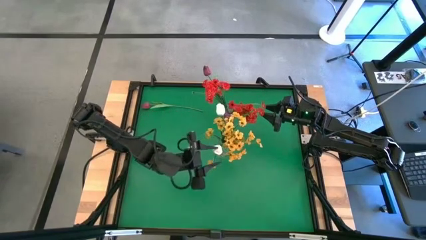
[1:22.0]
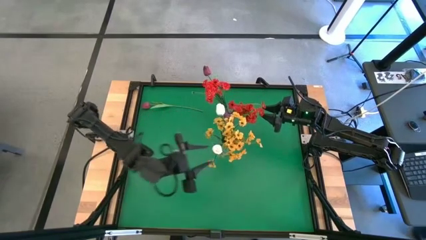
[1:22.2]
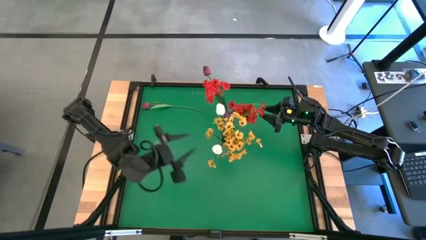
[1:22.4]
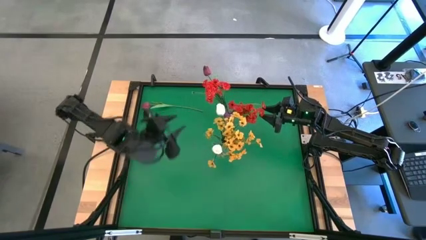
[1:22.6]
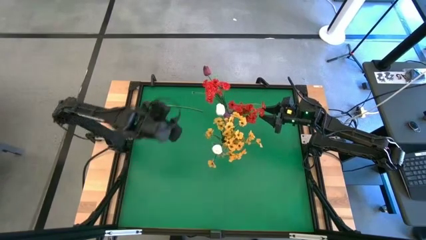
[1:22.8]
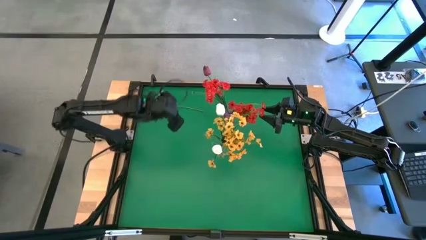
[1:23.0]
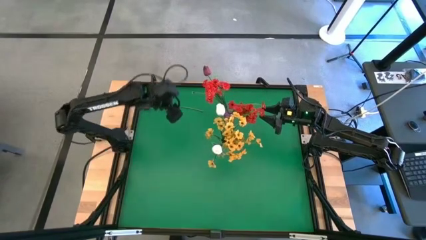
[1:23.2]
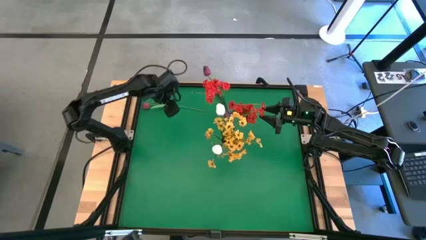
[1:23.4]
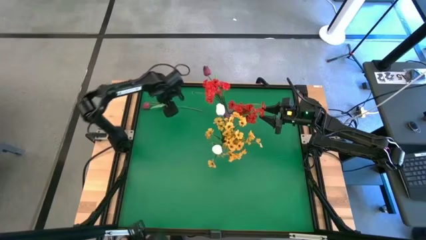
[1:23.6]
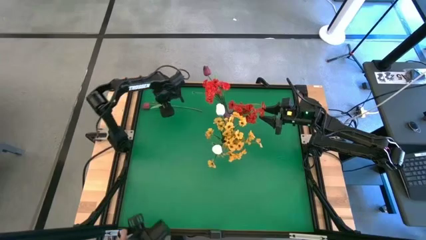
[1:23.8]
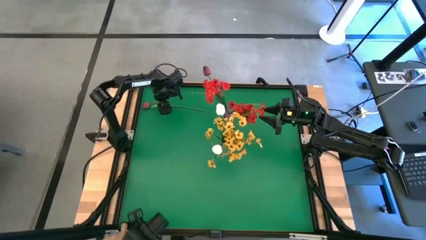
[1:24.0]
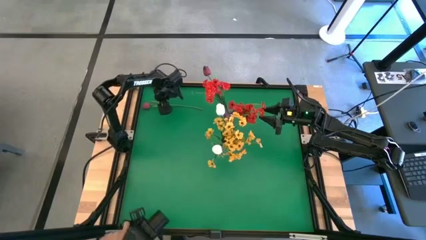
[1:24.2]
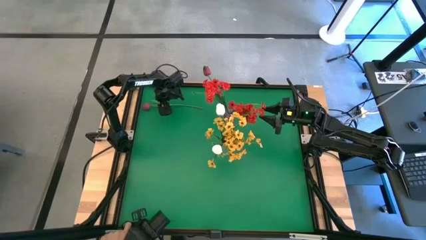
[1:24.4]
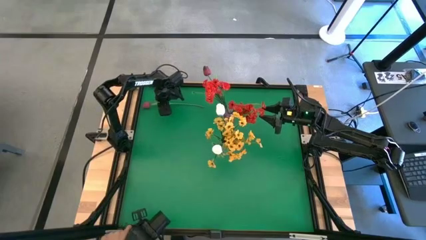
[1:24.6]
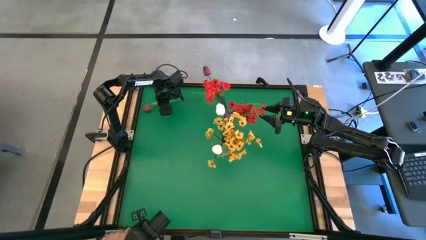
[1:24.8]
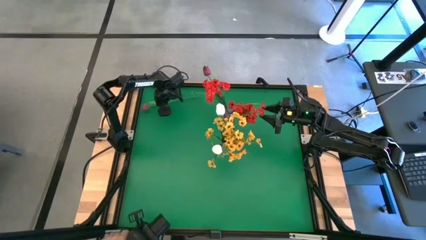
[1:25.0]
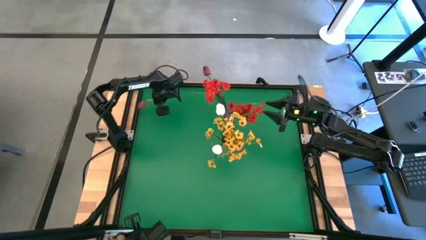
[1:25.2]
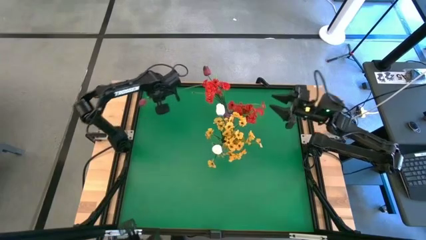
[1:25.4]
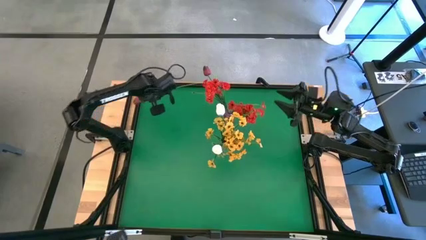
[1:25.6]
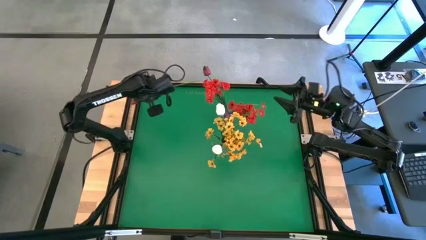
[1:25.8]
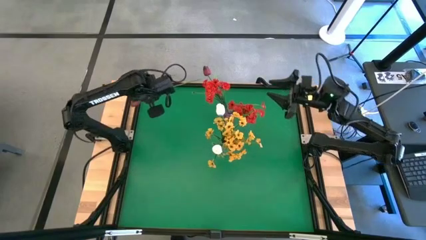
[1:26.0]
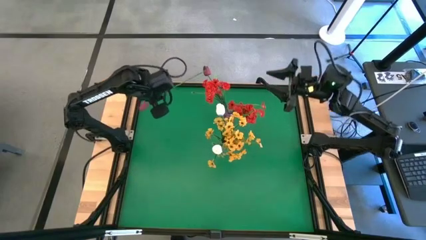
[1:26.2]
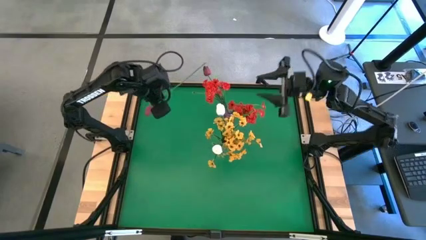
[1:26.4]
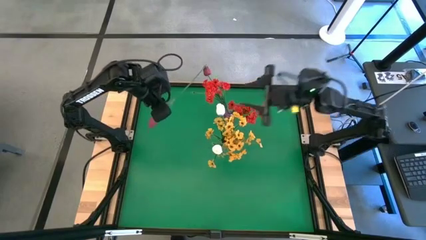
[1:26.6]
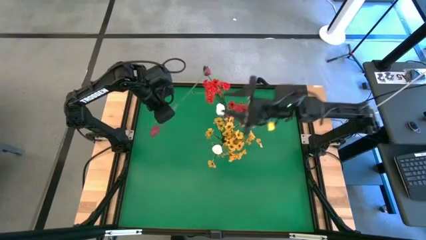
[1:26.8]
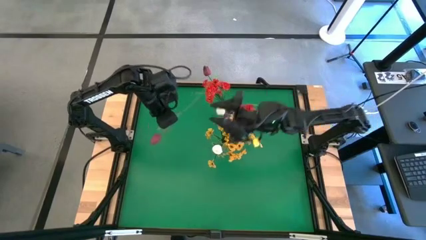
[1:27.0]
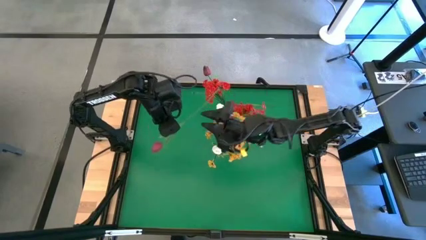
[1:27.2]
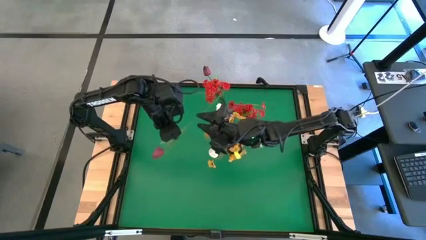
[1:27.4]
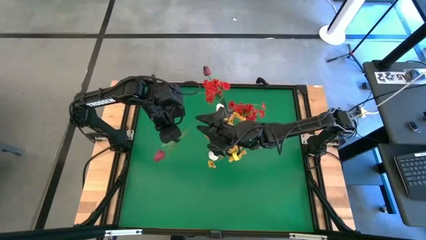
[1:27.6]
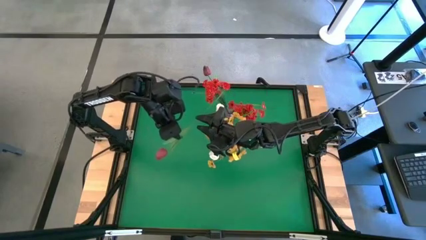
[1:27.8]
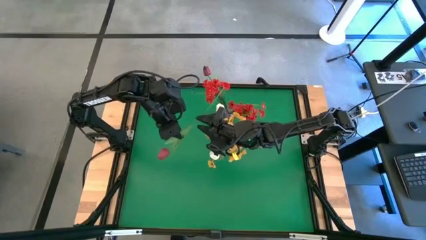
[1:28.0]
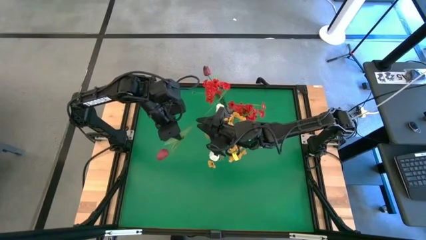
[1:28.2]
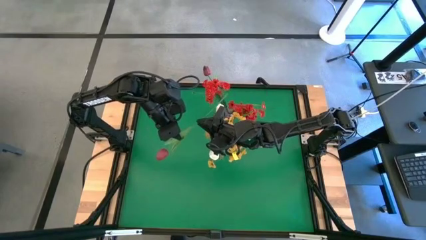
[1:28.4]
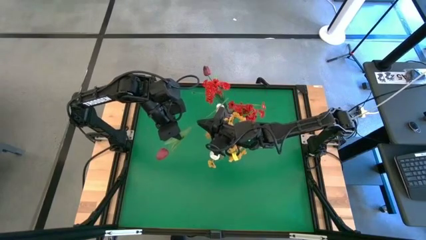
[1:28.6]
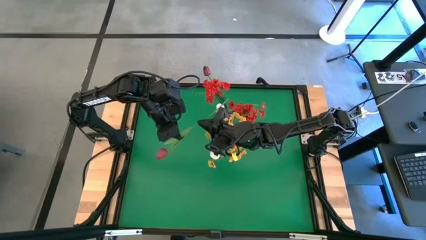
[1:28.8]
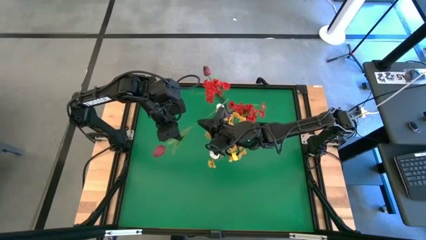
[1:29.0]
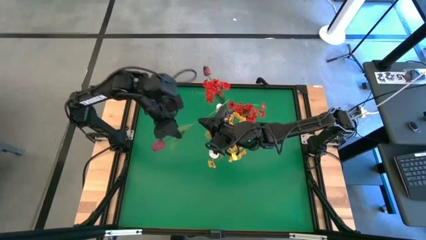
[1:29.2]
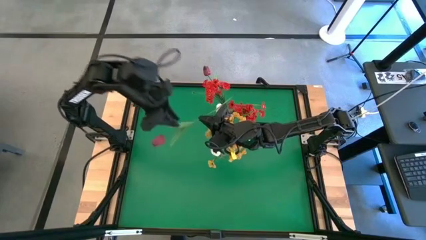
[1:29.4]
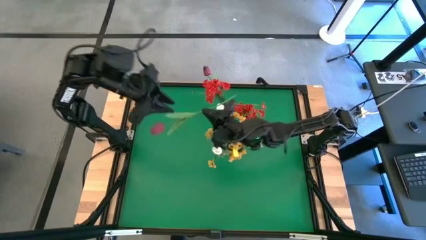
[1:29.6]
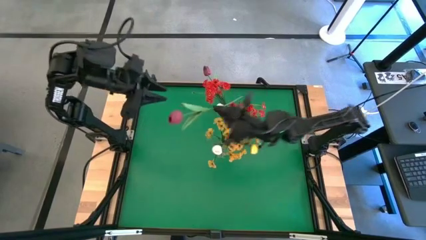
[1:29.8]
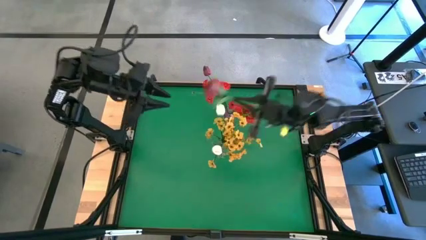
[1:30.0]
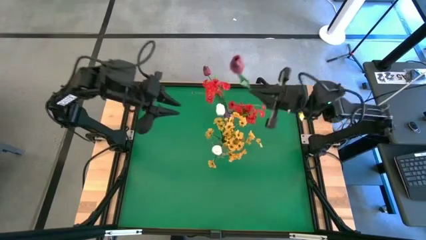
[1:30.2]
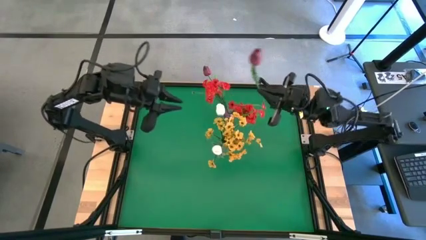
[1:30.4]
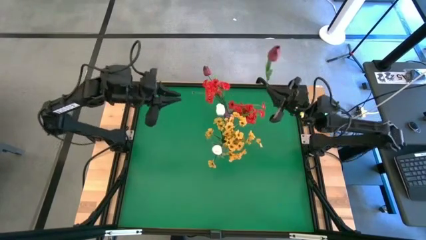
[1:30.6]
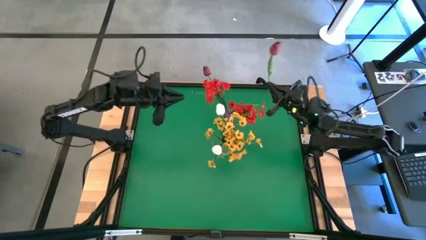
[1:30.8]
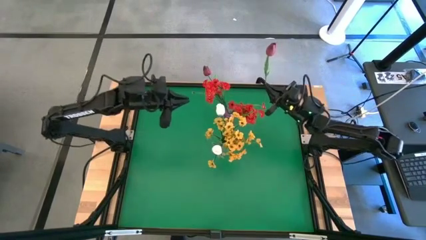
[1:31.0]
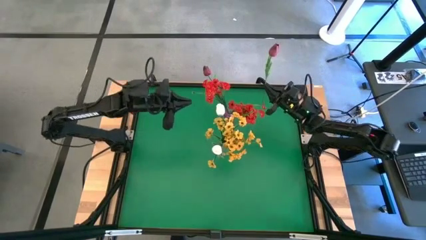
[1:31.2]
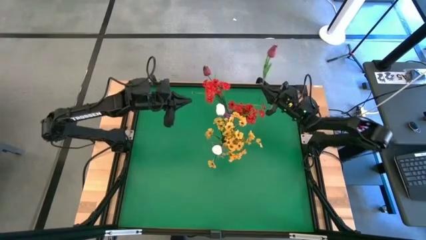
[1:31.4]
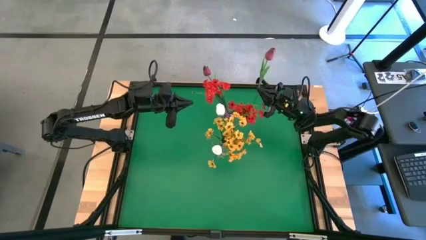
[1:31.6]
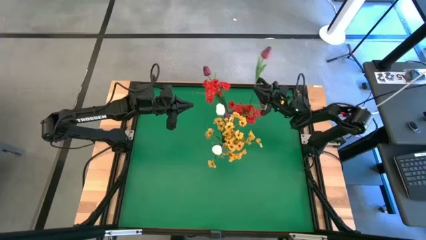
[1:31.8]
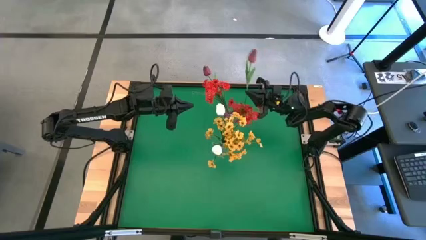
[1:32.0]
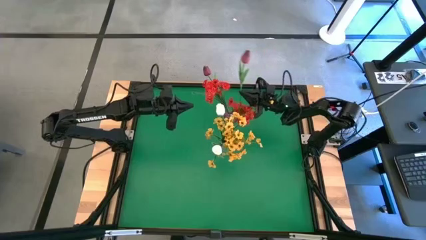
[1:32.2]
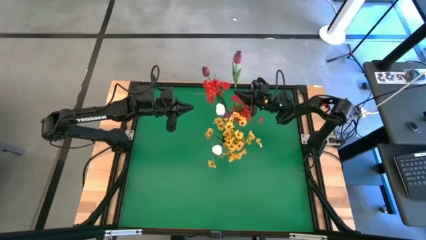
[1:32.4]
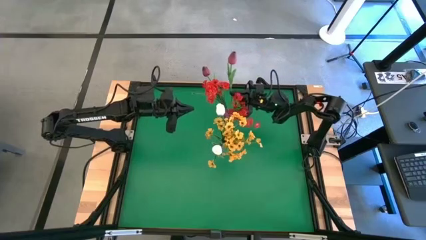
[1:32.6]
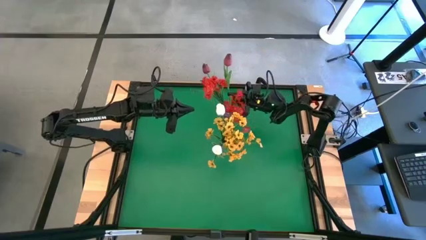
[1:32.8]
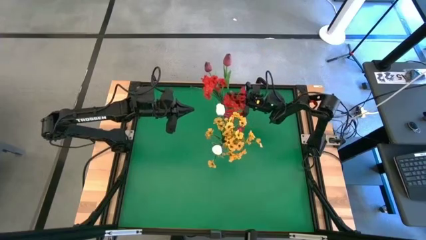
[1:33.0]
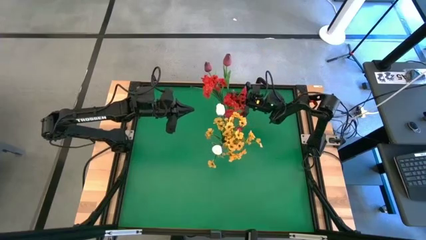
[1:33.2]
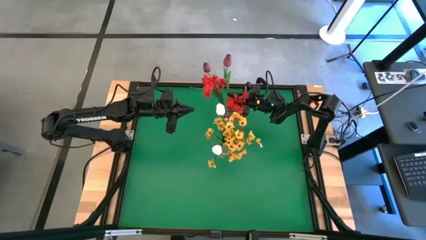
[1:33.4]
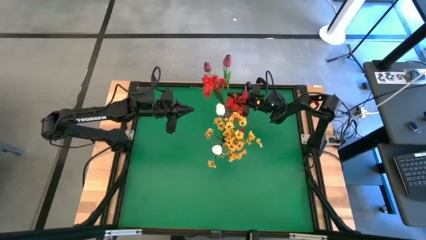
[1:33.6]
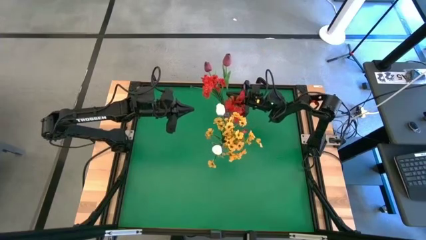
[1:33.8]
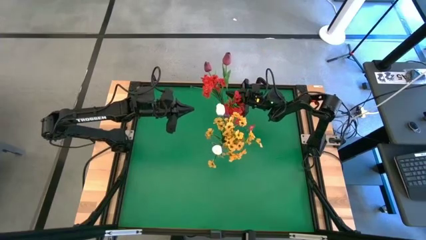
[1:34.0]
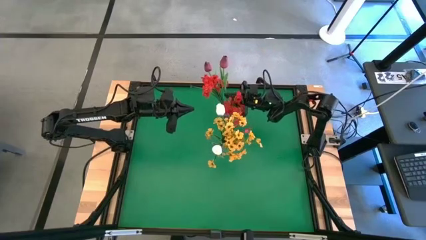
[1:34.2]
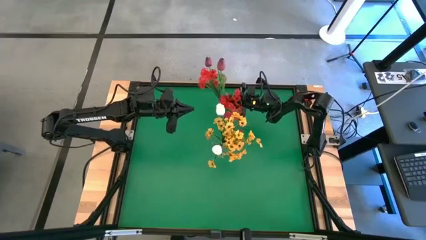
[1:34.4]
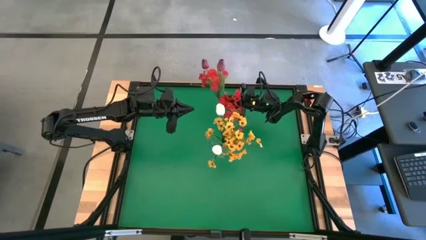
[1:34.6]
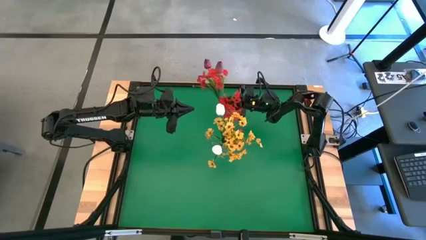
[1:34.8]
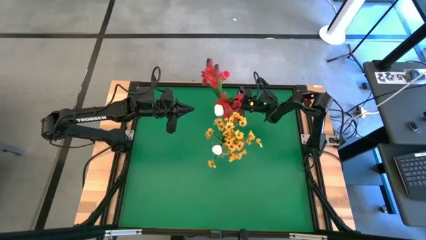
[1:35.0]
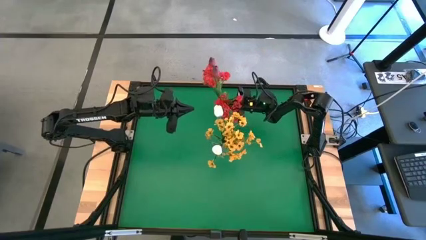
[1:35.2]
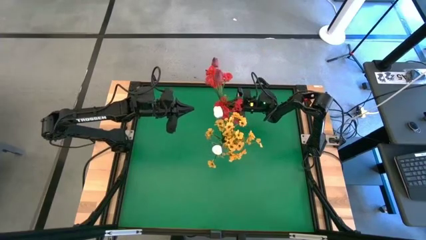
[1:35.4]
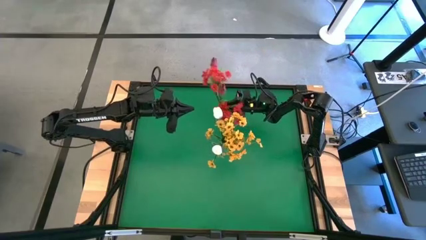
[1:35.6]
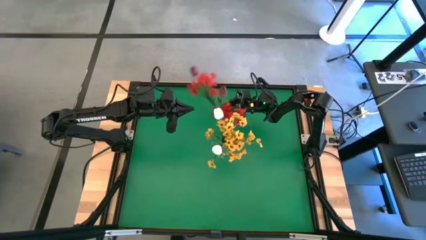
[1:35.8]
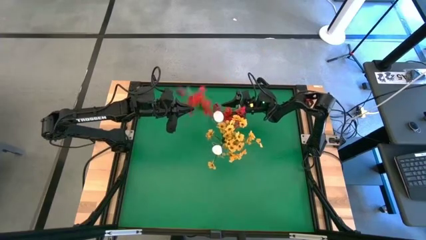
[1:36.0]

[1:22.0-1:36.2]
Task: Sort flowers into vase by color
Put the red tulip into the violet vase

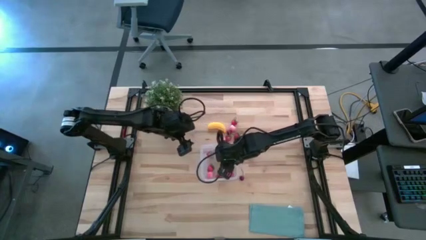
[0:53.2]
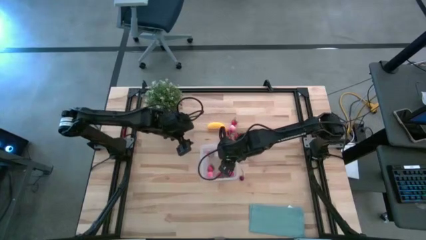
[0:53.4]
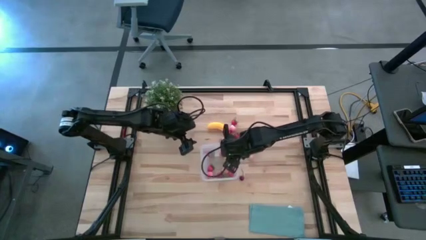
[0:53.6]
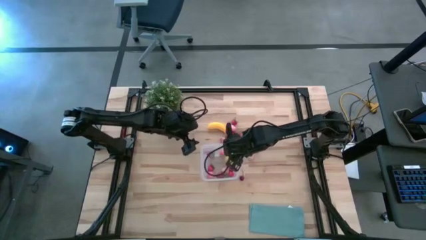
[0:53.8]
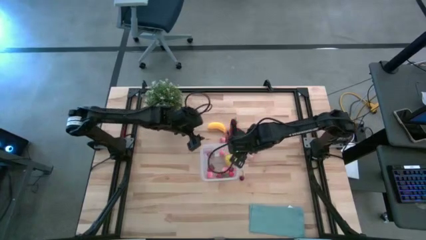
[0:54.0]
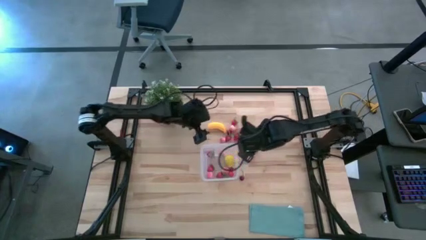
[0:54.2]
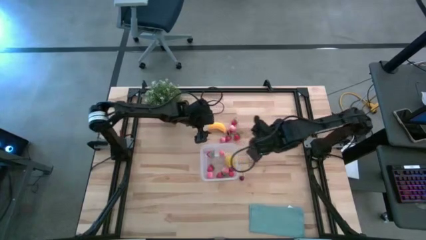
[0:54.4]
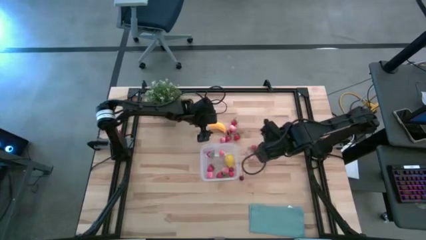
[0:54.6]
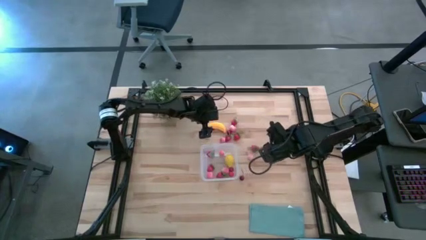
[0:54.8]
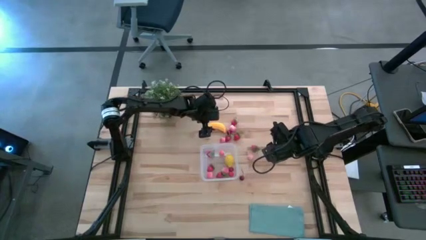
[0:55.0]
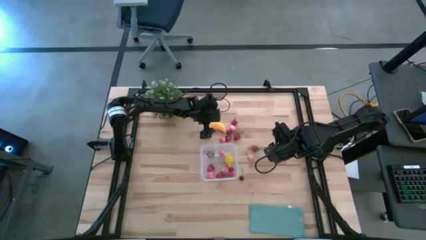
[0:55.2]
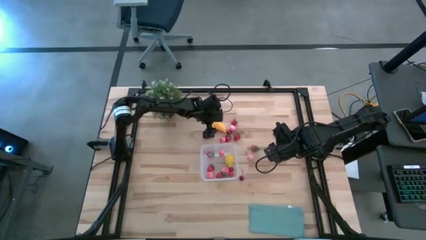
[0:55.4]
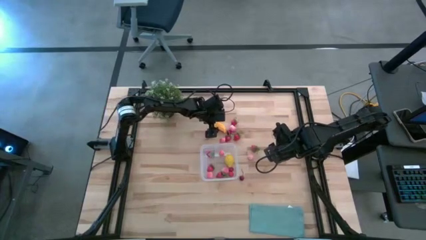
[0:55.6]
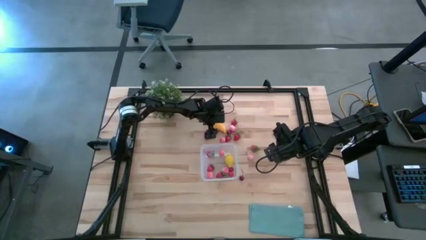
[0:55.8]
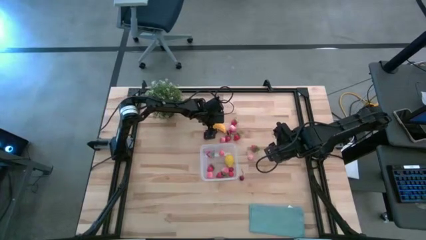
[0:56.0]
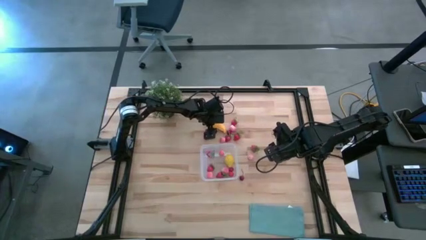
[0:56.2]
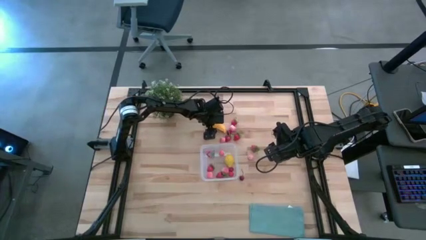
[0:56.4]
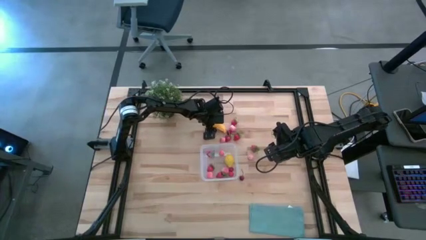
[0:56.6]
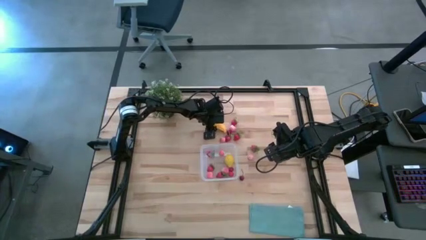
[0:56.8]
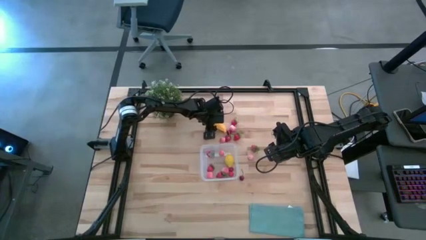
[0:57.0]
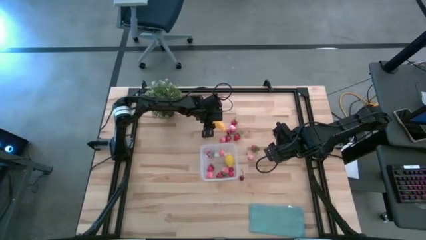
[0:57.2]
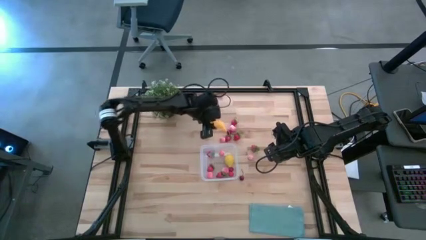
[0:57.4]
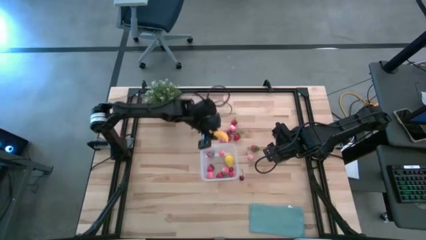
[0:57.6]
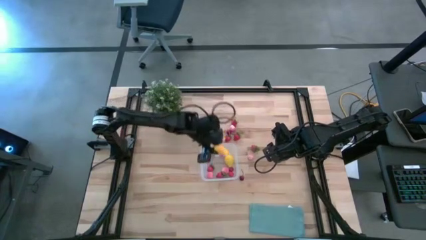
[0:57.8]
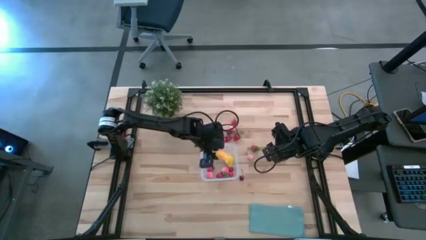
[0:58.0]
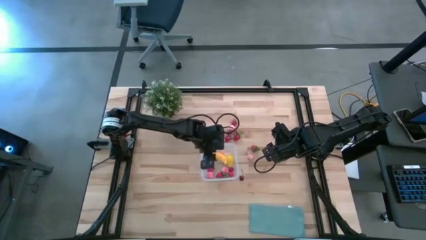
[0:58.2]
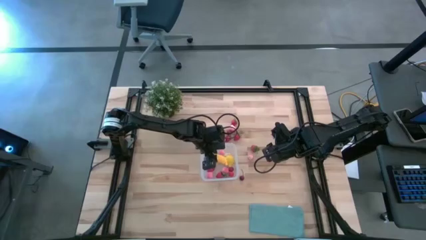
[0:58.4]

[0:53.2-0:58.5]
Task: Pick and placing Produce into tupperware
Put the yellow banana into the transparent container
